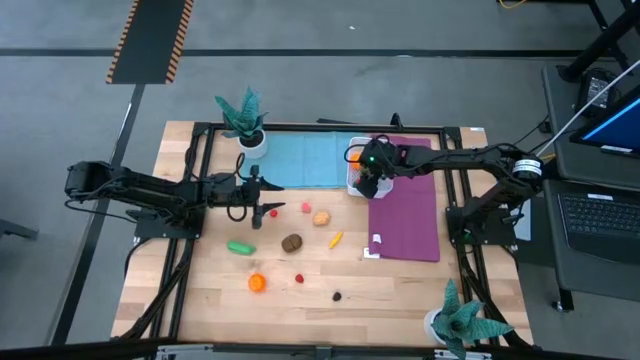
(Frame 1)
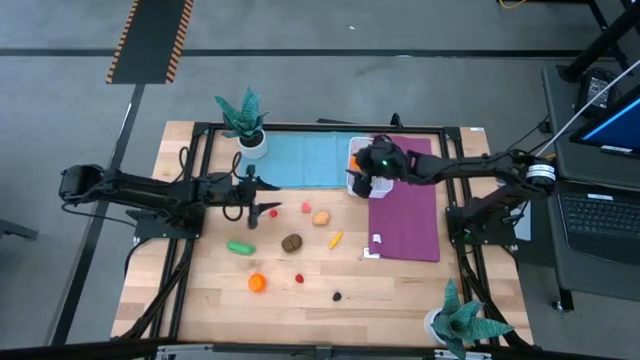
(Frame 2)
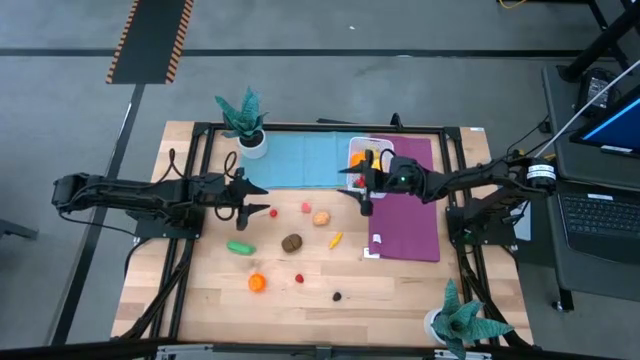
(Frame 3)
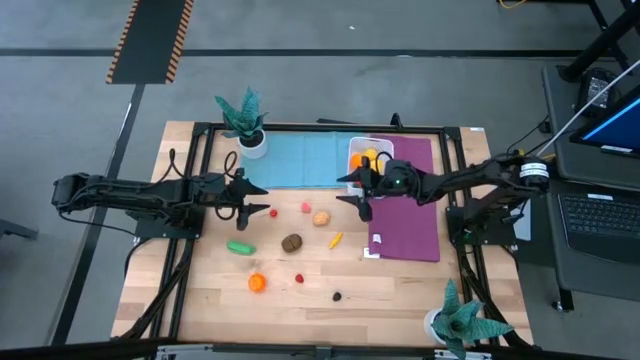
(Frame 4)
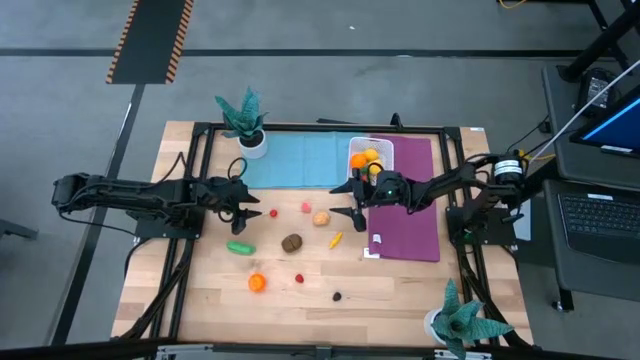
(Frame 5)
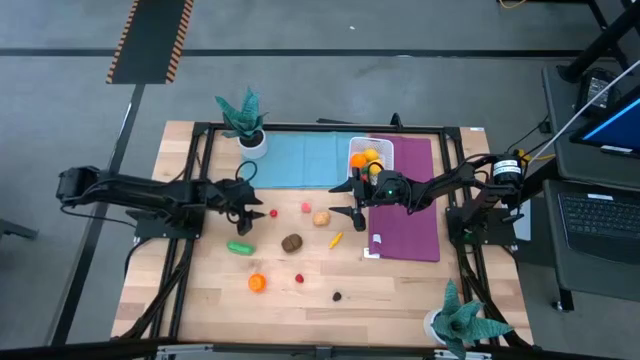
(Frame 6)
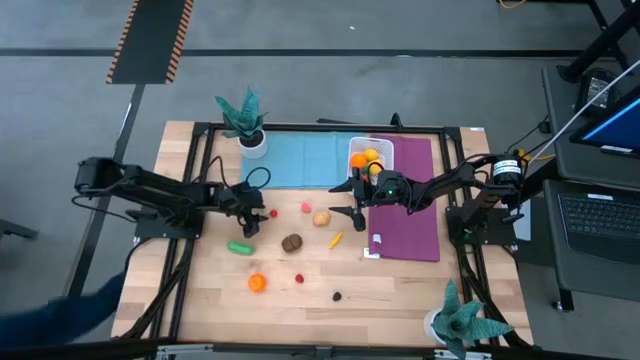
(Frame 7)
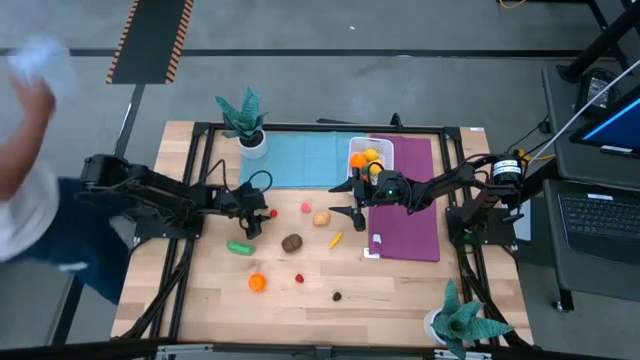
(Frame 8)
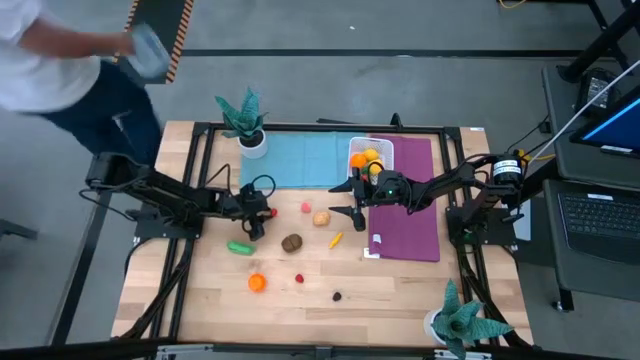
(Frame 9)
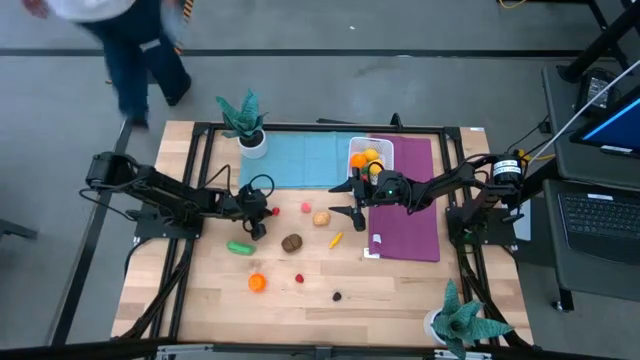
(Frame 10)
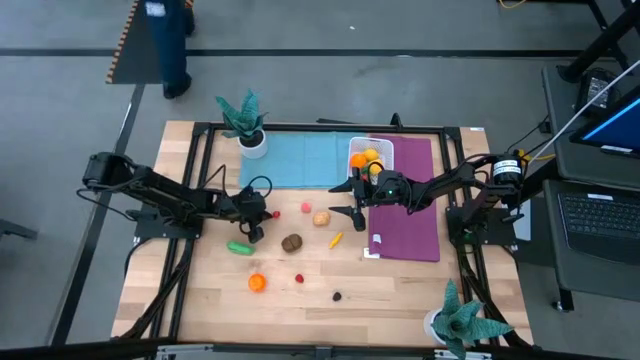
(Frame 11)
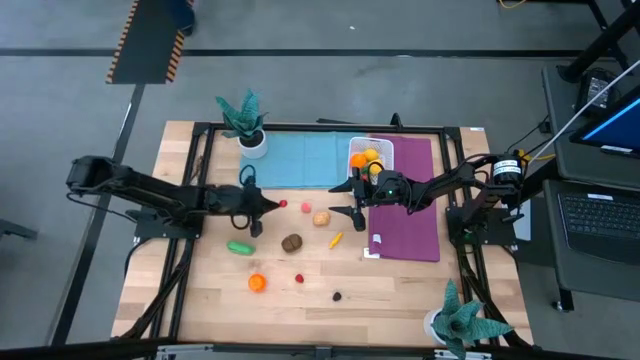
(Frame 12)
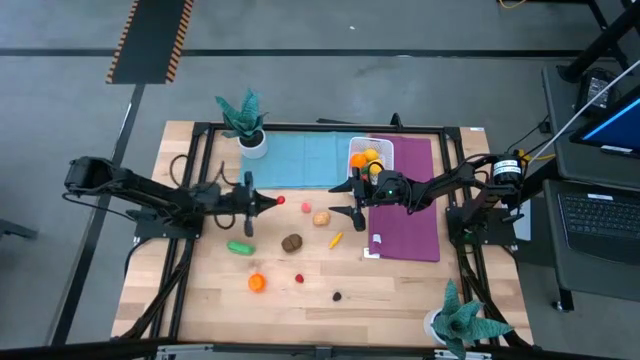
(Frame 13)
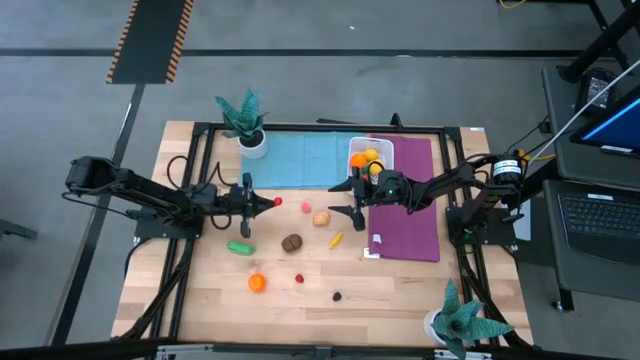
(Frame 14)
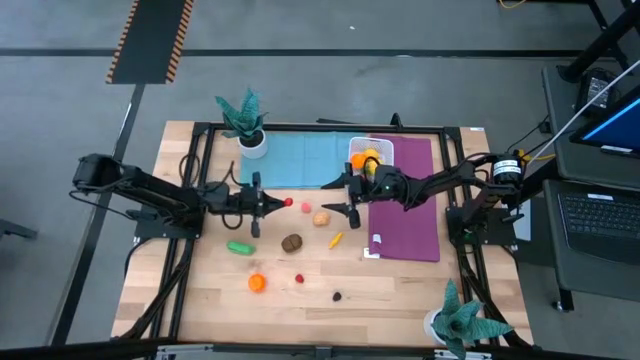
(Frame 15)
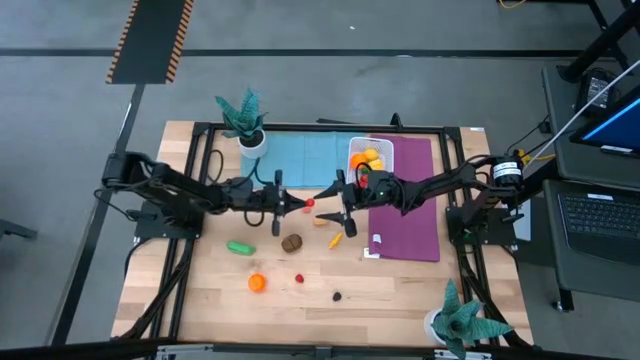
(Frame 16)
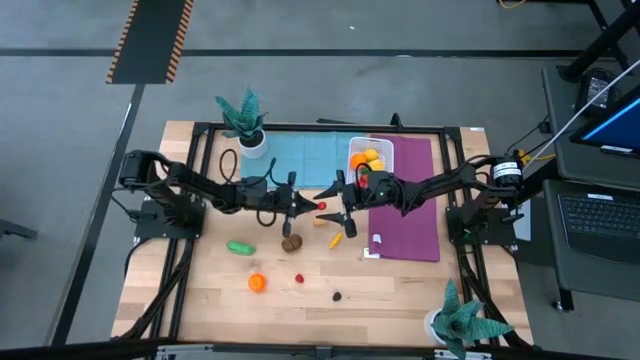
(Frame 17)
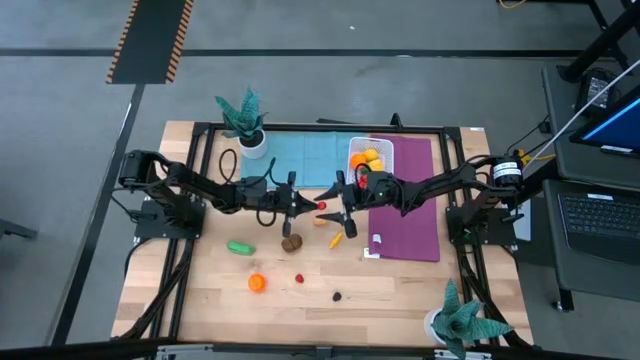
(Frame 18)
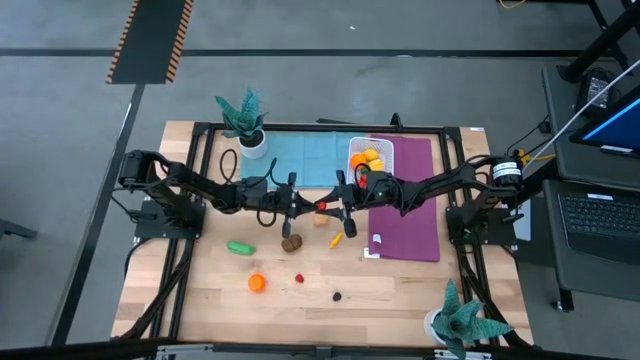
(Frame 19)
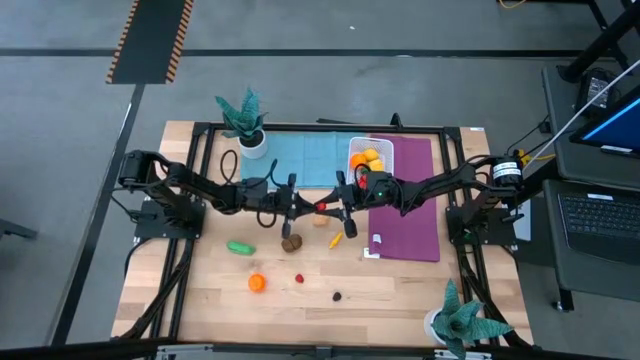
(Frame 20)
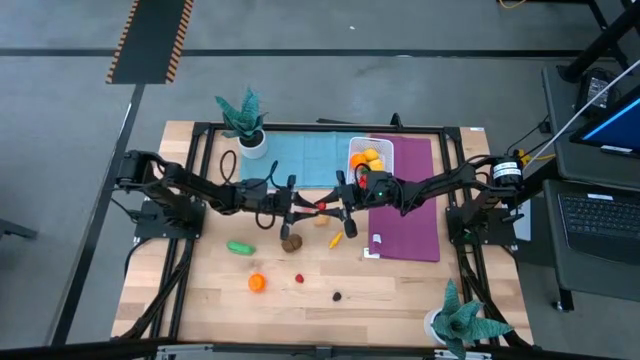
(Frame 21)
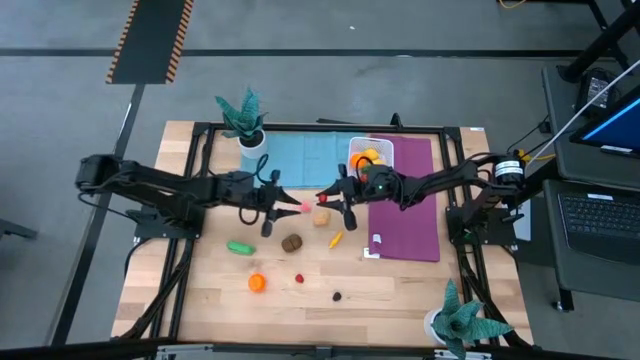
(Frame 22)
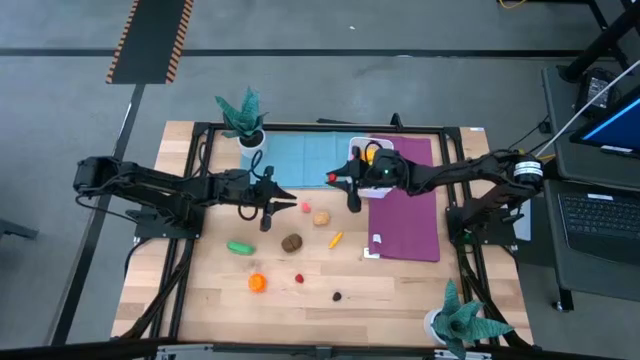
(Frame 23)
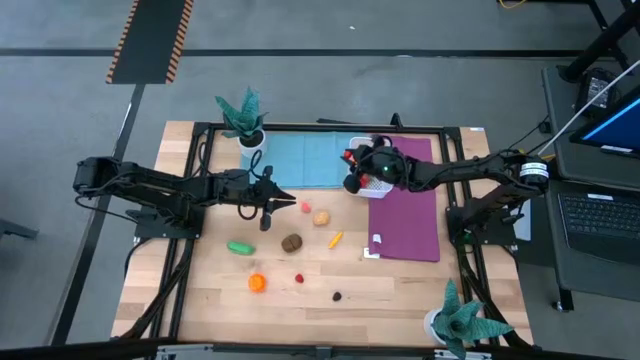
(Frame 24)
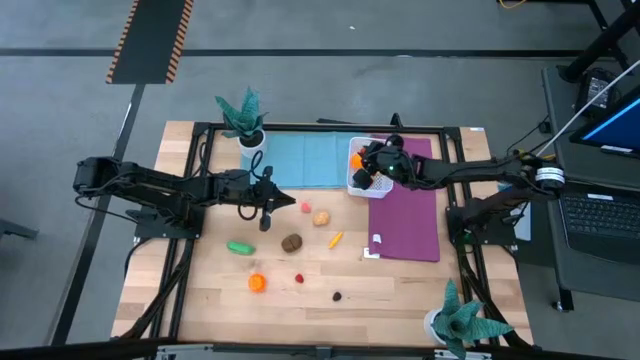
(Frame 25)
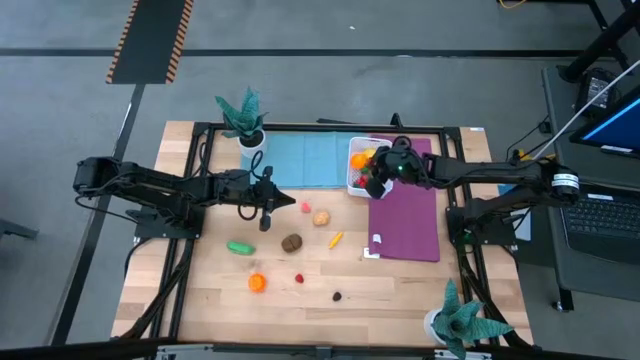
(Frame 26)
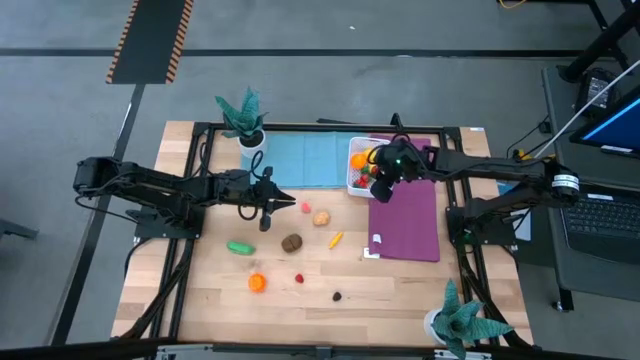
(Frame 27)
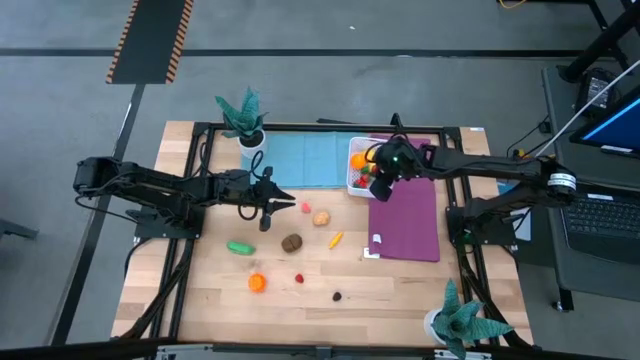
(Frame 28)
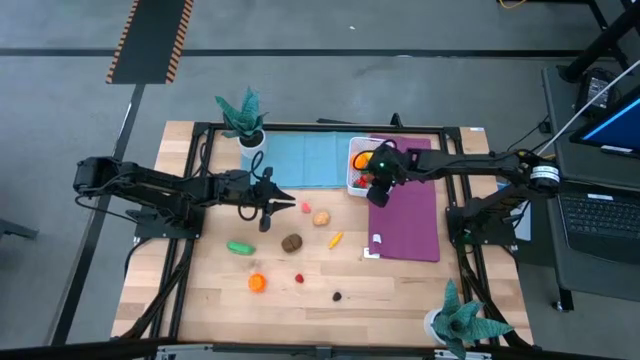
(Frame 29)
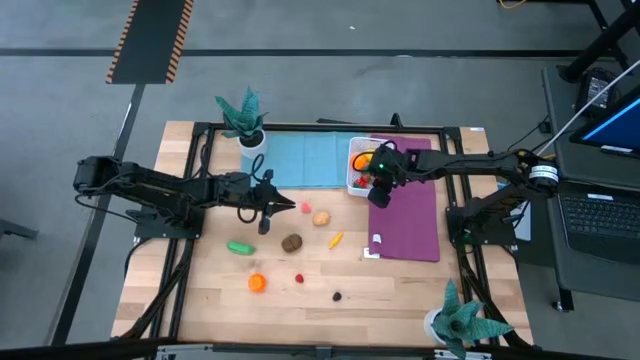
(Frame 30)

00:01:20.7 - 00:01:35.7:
Task: Pick and placing Produce into tupperware
Put the red cherry into the white container

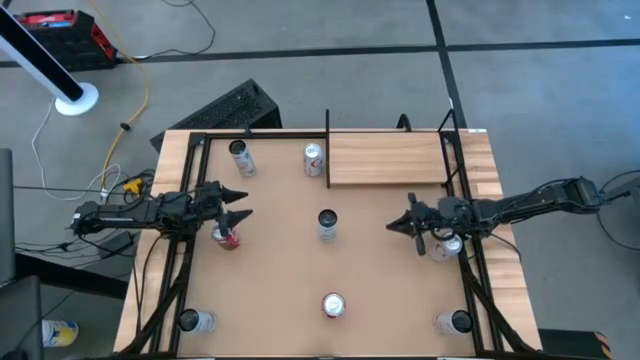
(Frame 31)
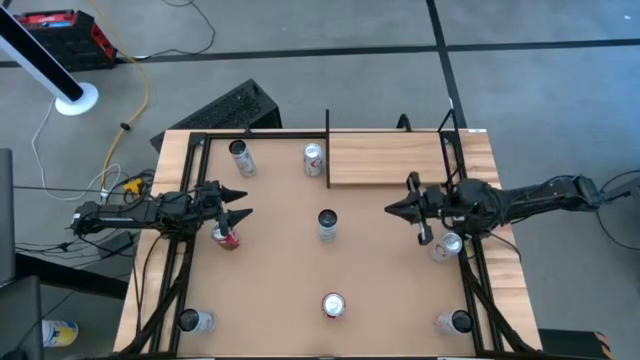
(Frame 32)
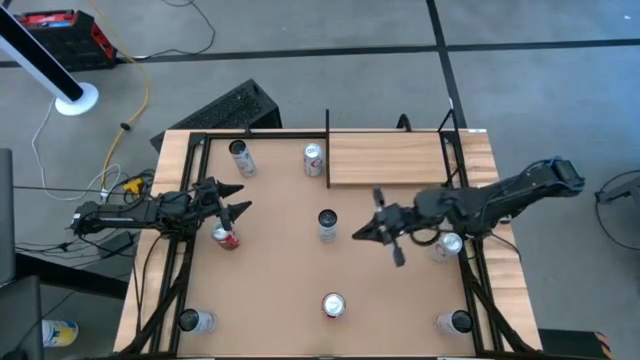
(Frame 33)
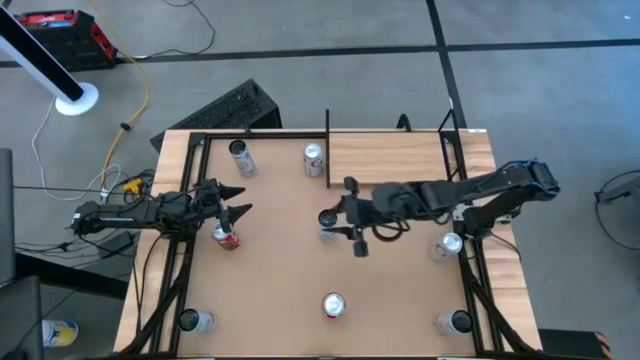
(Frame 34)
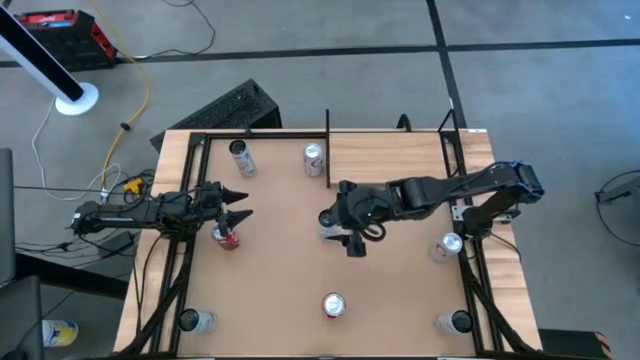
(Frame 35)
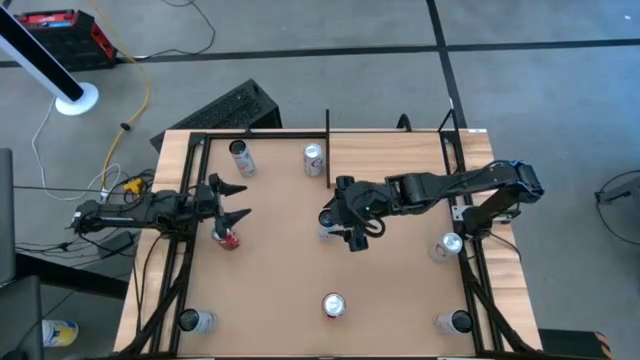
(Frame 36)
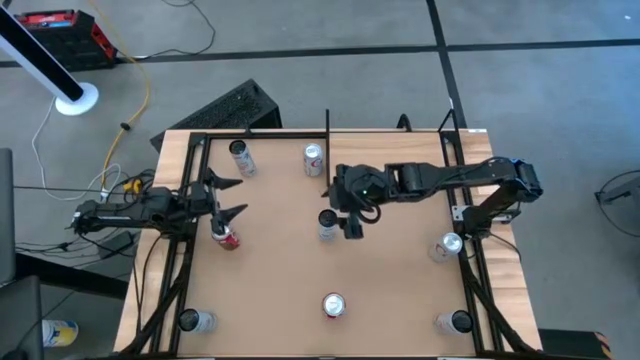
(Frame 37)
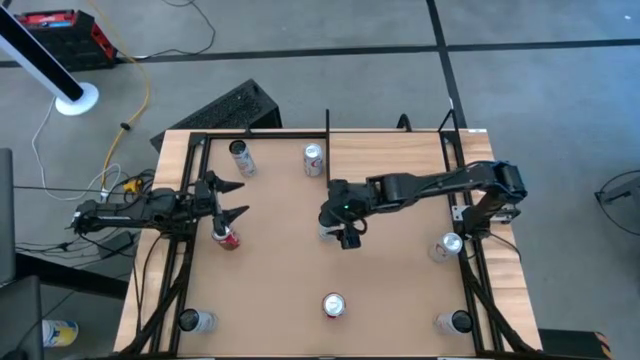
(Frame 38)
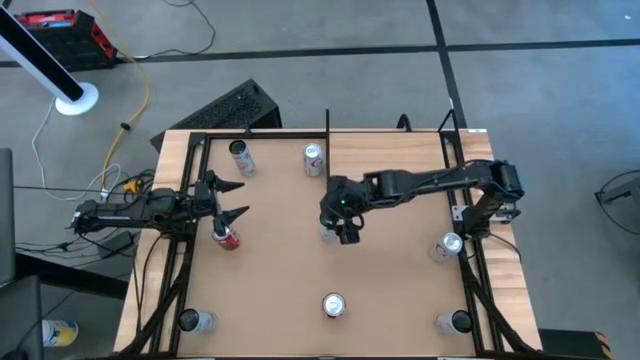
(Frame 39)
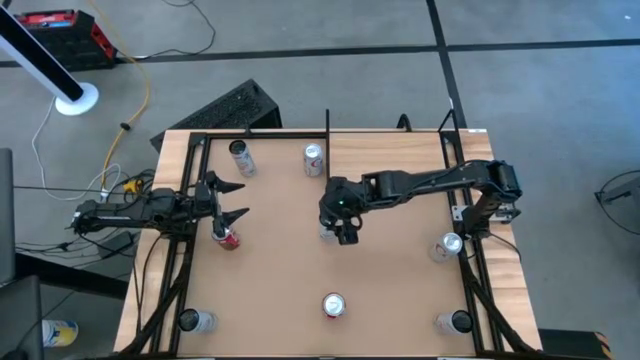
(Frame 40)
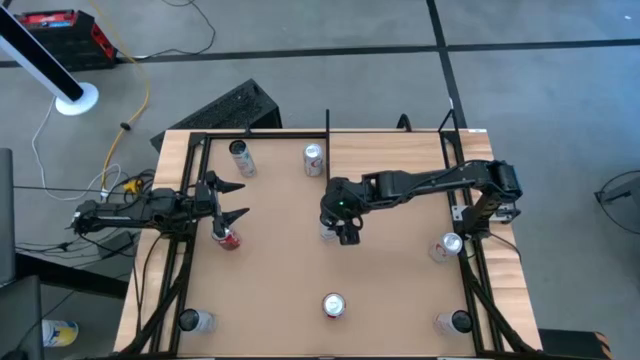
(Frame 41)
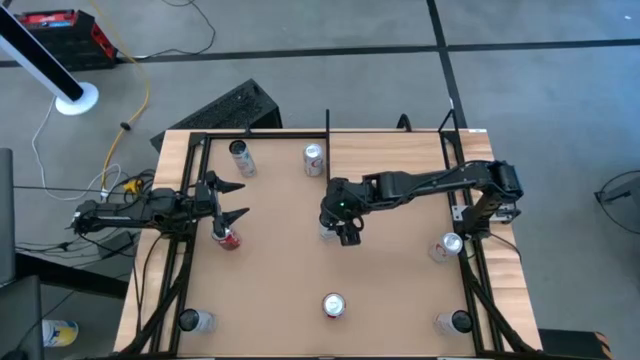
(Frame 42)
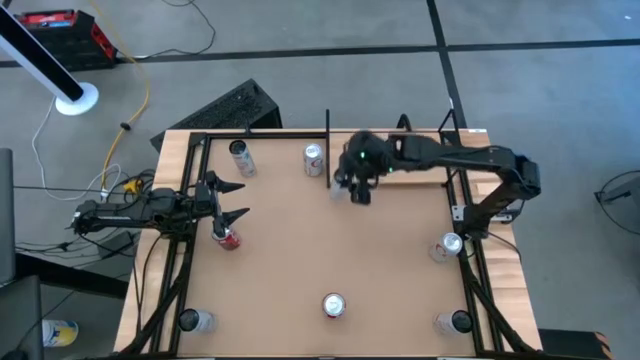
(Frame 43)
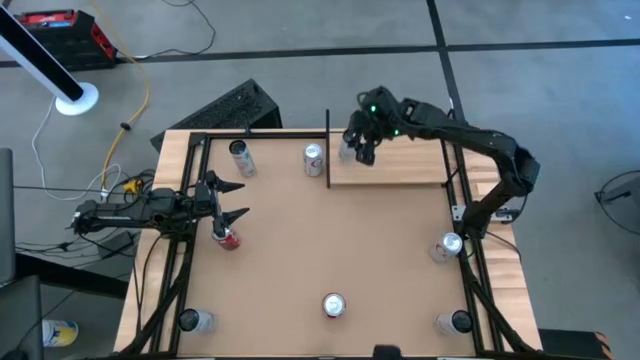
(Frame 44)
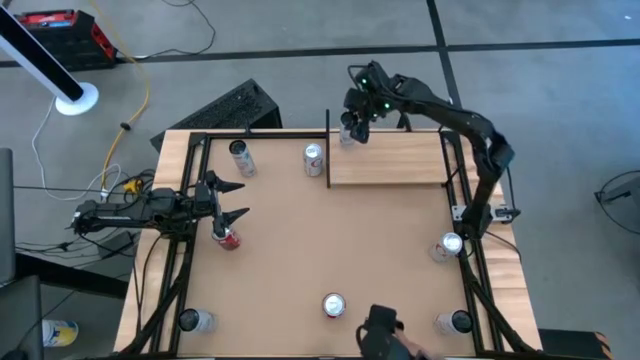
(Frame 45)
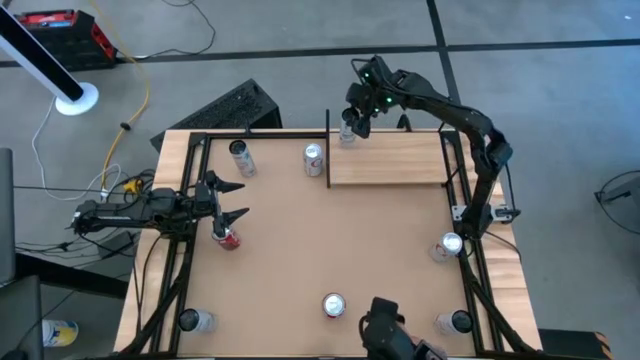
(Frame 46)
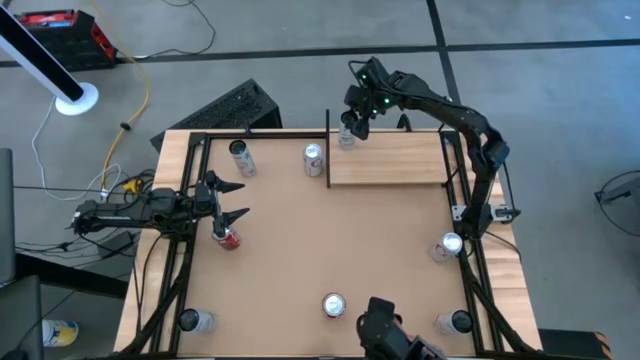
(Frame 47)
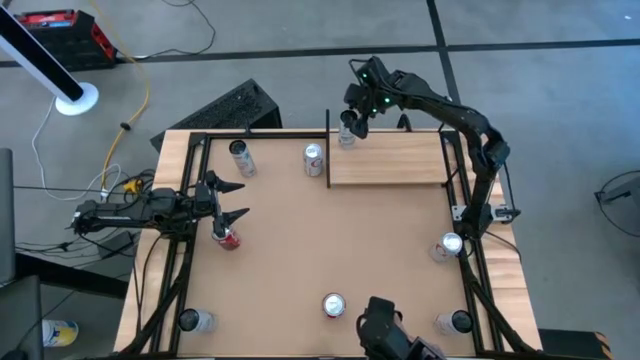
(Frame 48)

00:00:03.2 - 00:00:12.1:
Task: Place canned beverage on shelf
Put the top white-blue soda can on the shelf
